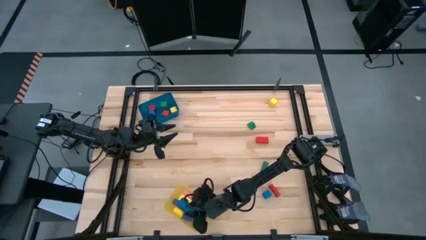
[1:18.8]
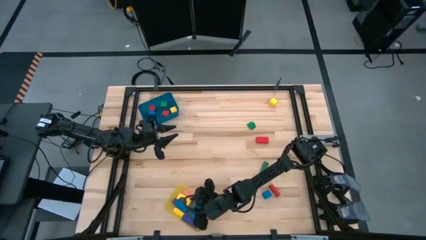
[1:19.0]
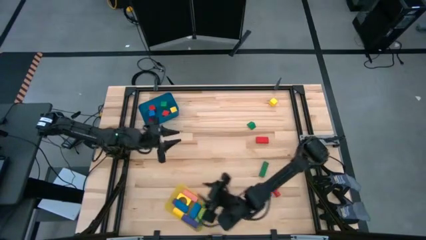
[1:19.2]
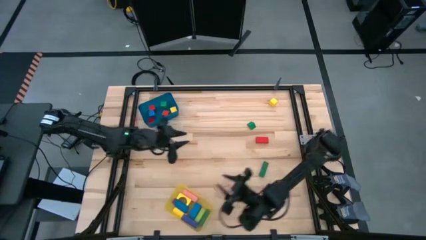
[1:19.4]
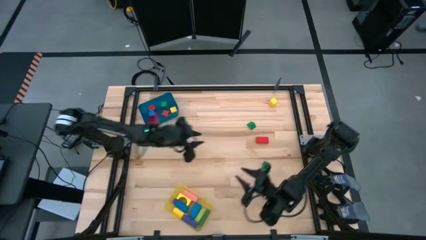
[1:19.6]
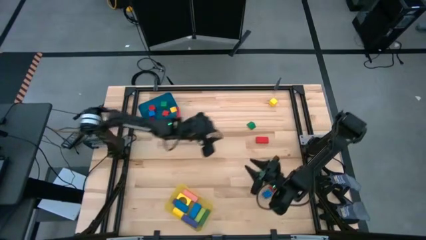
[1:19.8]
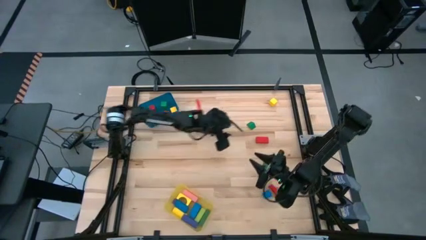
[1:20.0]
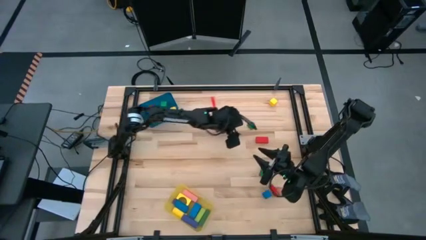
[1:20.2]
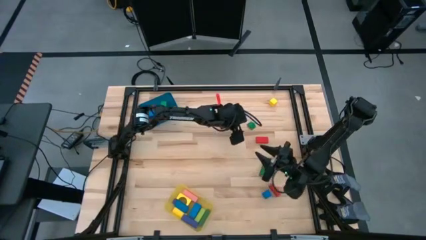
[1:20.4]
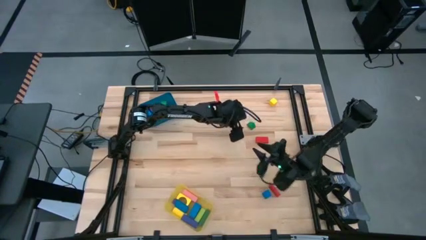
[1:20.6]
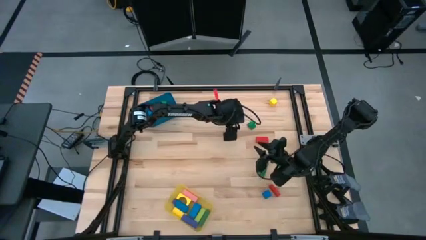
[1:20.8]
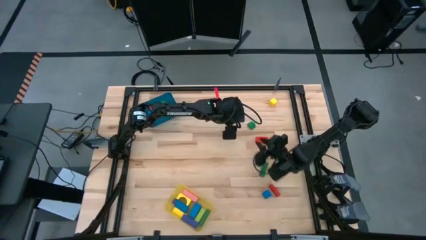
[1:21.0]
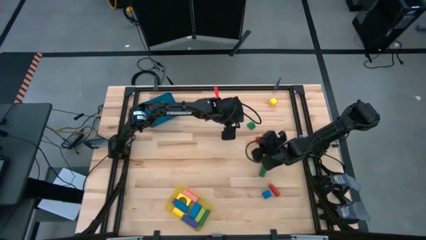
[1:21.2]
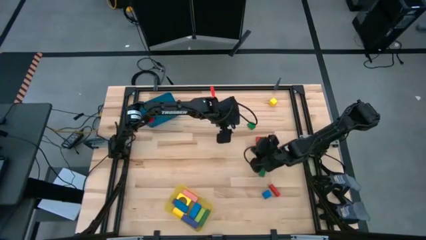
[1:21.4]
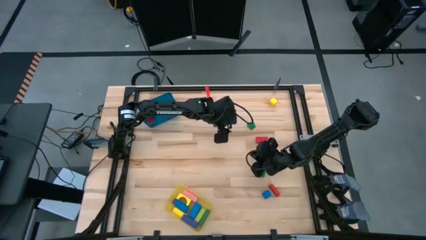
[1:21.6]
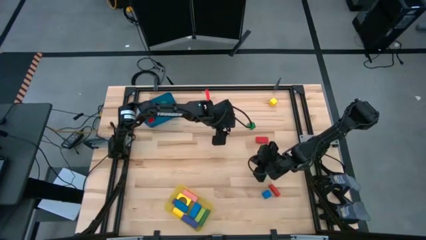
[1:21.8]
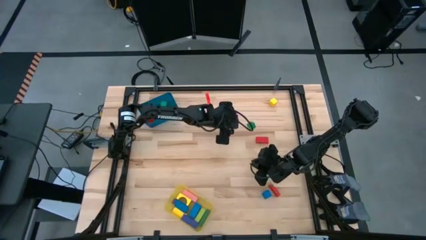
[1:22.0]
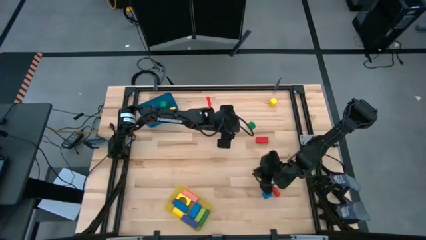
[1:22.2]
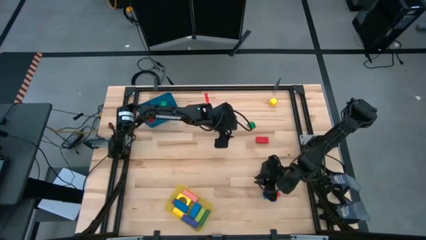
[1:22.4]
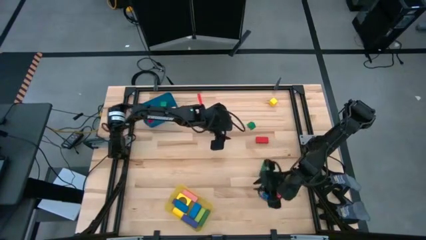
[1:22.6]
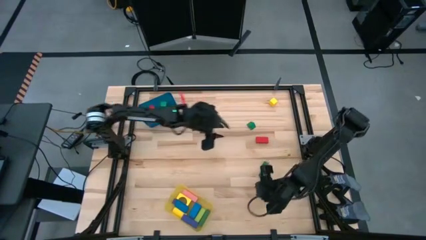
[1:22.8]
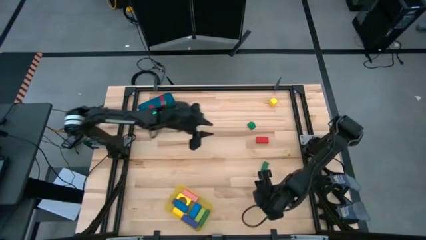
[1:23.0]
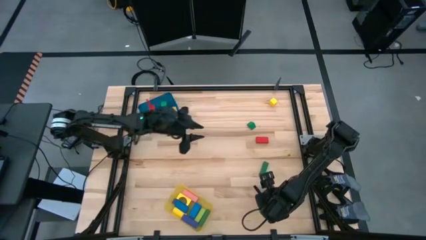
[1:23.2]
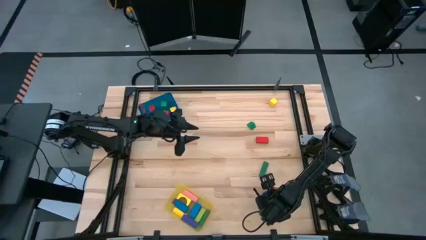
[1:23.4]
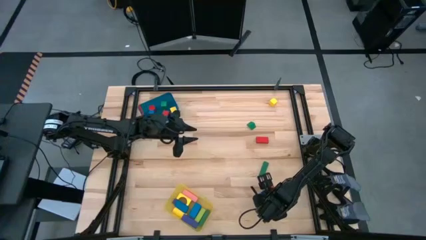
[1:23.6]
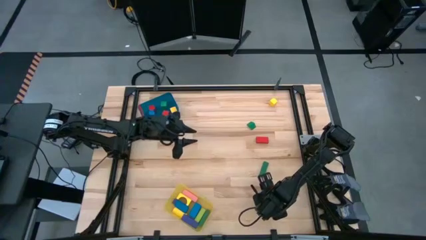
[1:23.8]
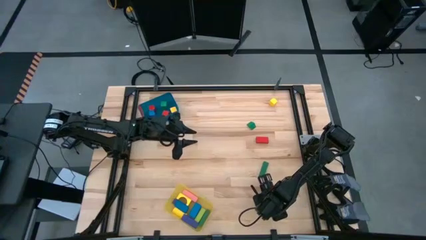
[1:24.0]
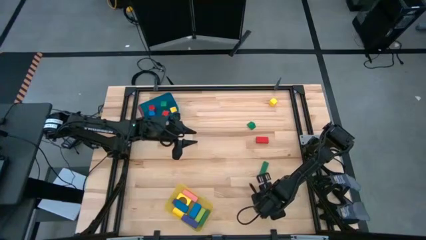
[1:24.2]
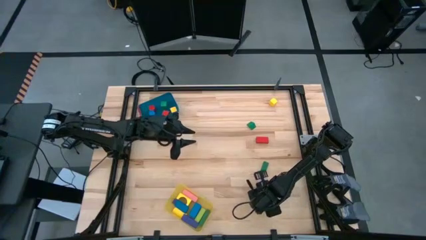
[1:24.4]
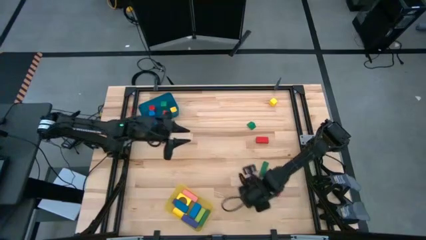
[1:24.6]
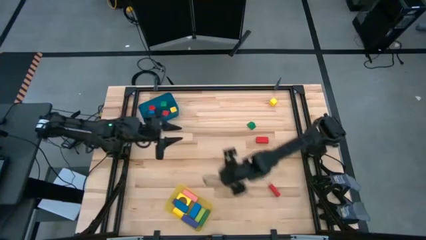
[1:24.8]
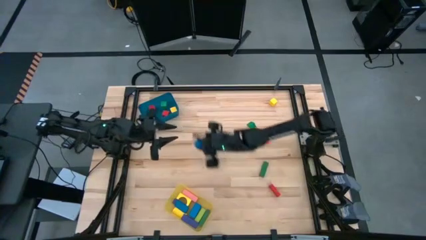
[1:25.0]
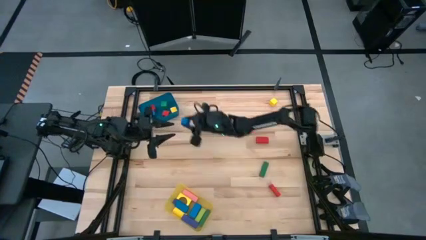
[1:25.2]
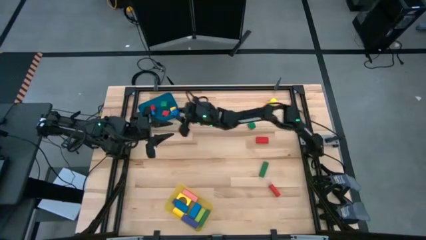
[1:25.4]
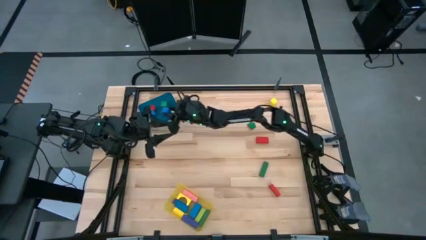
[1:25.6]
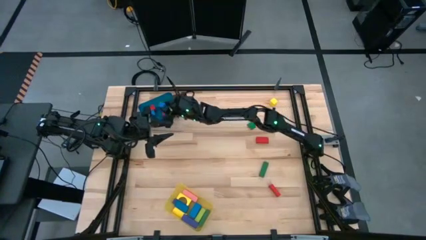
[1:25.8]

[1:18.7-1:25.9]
Task: Sort blocks by size
Put the small blue block into the blue bin

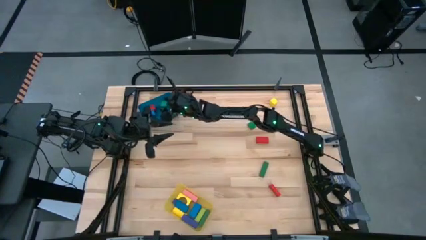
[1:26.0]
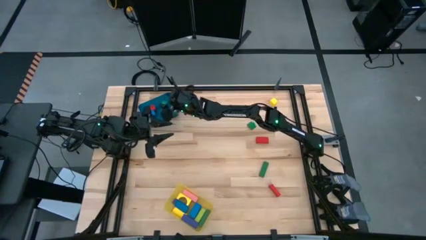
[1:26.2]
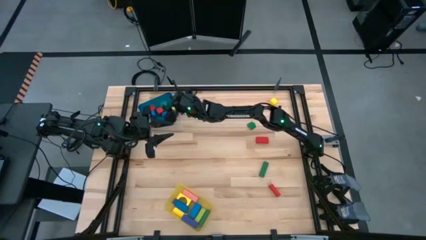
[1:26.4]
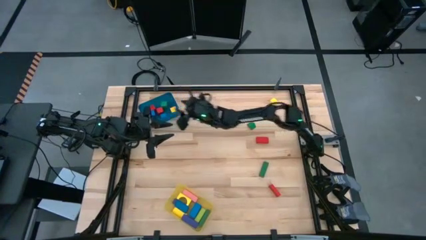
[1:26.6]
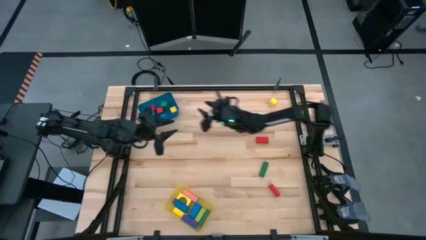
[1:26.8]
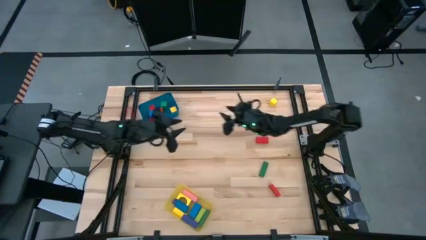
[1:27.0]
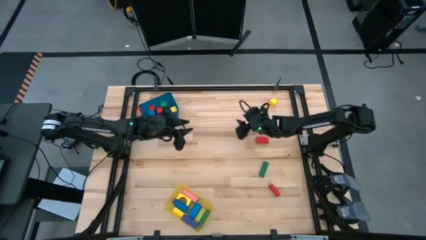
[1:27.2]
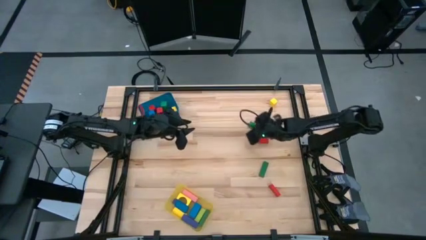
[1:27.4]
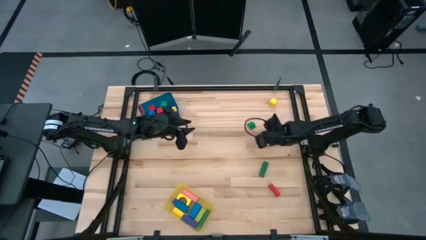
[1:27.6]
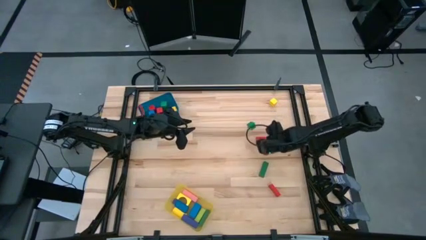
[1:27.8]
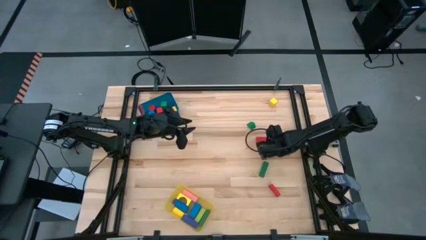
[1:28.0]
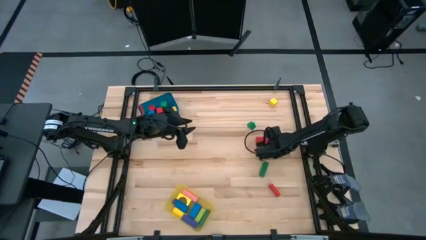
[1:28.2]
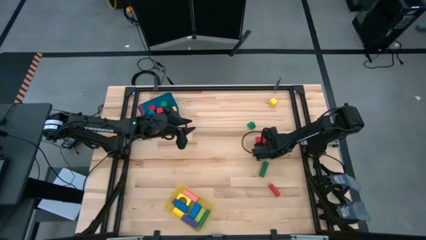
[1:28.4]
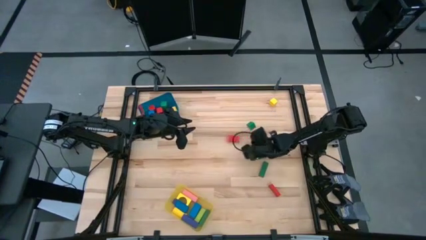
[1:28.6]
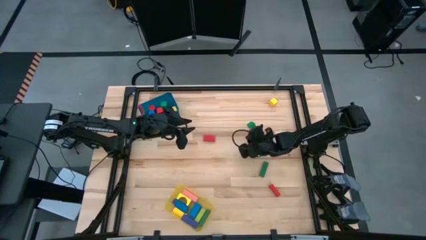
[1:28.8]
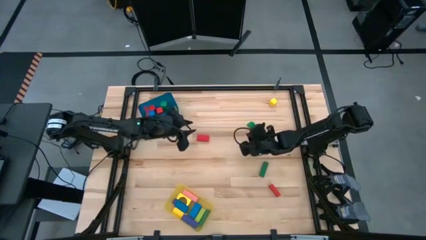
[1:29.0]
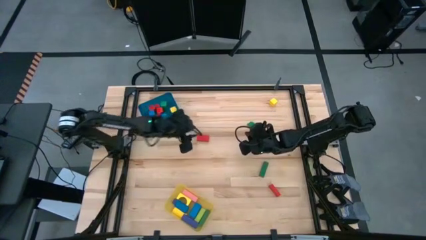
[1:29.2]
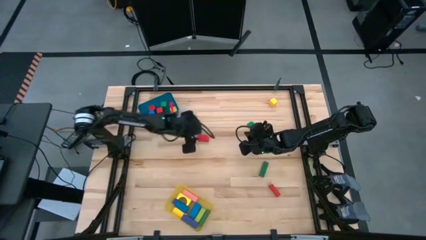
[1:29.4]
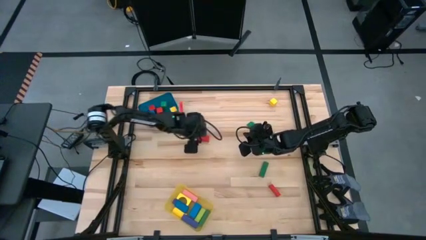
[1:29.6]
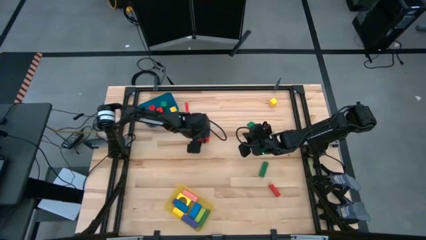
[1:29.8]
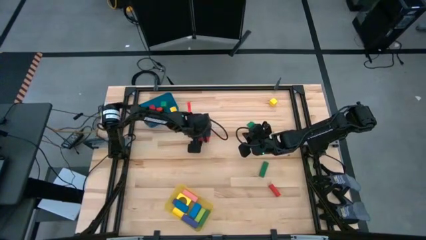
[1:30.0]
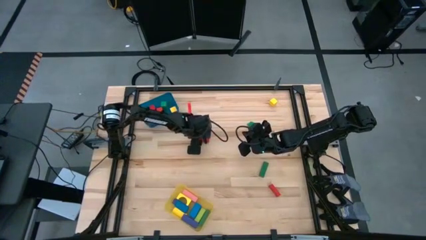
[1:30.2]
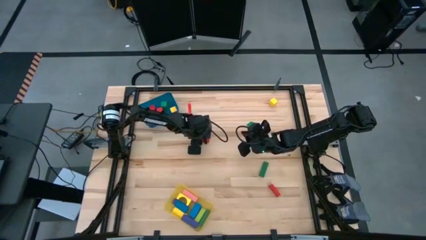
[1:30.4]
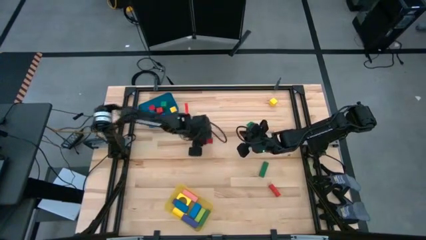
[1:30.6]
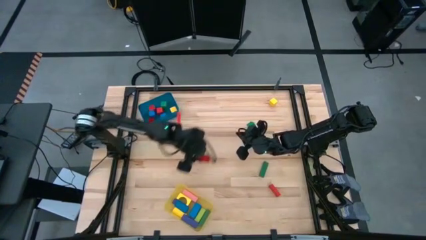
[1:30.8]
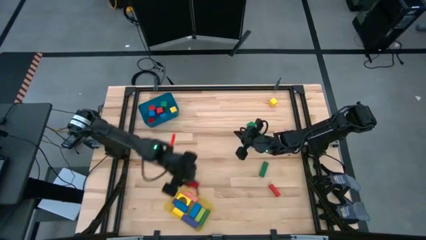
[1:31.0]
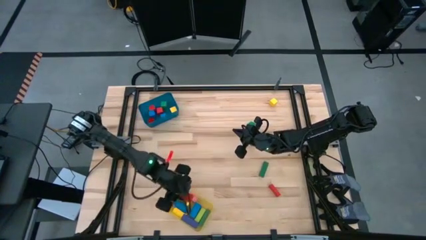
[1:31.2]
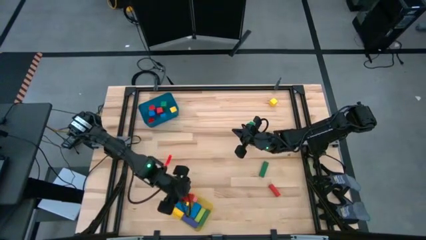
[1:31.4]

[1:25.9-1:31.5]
Put the top large red block into the yellow bin

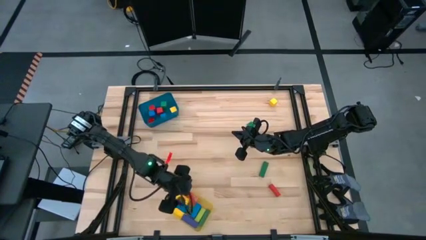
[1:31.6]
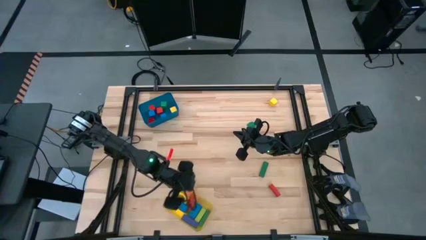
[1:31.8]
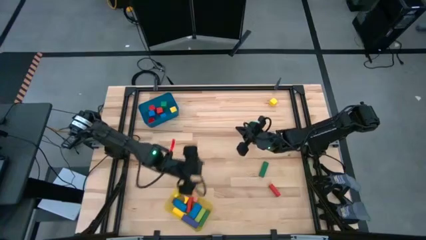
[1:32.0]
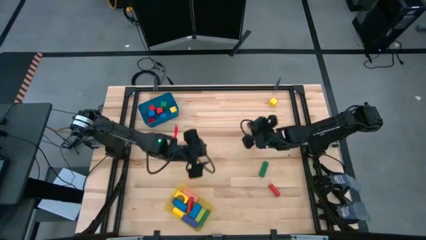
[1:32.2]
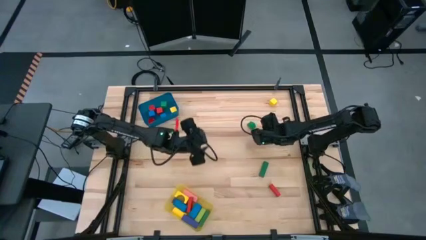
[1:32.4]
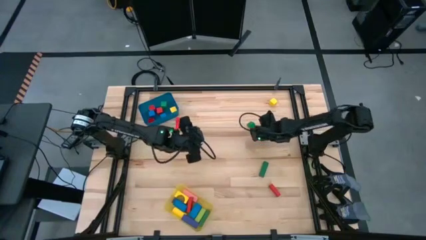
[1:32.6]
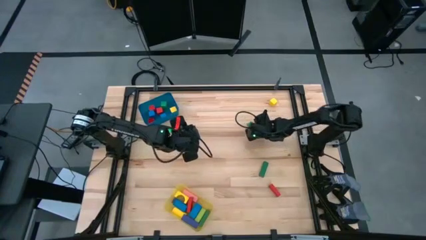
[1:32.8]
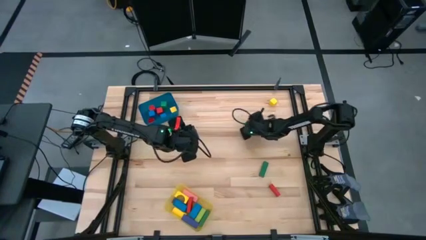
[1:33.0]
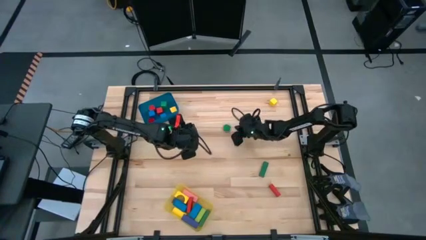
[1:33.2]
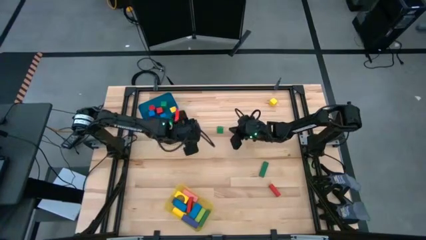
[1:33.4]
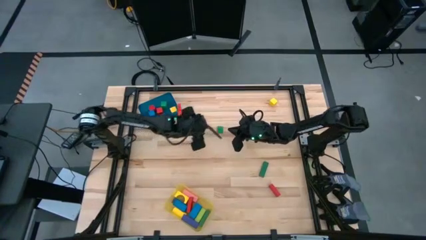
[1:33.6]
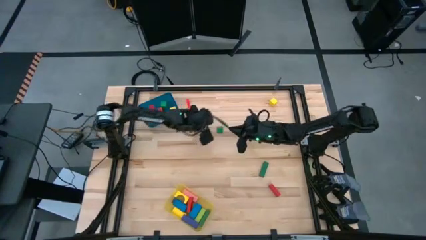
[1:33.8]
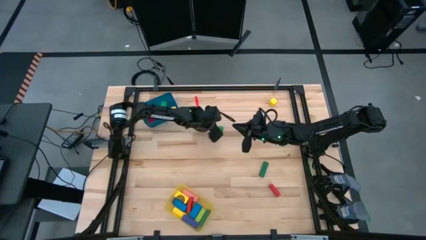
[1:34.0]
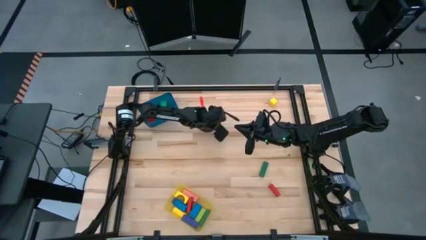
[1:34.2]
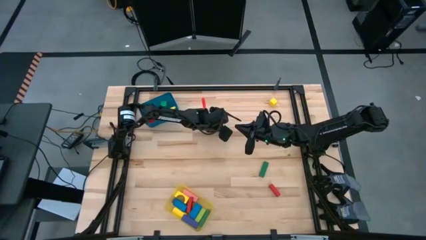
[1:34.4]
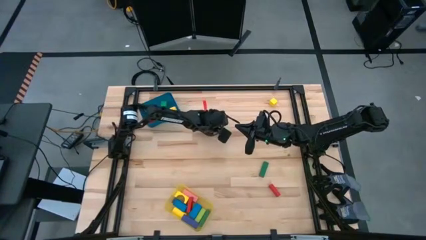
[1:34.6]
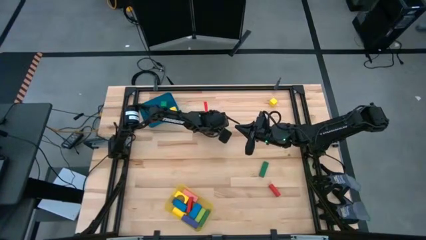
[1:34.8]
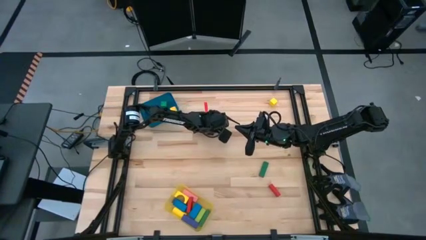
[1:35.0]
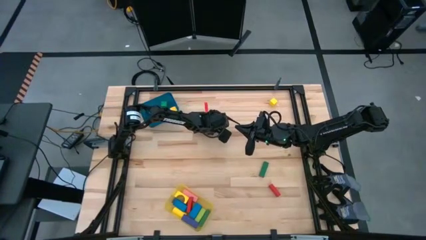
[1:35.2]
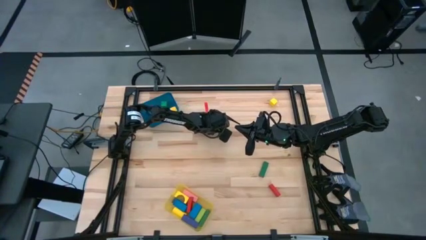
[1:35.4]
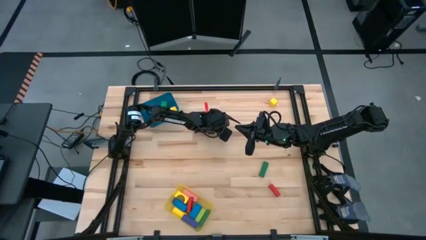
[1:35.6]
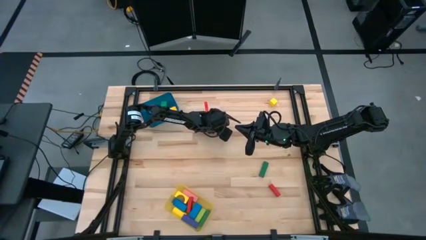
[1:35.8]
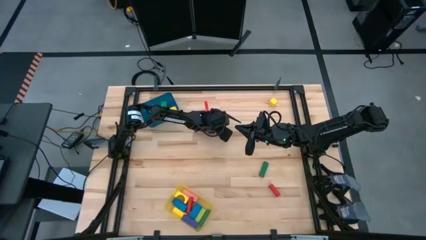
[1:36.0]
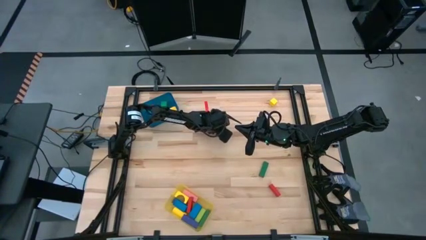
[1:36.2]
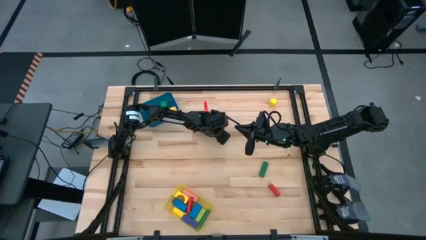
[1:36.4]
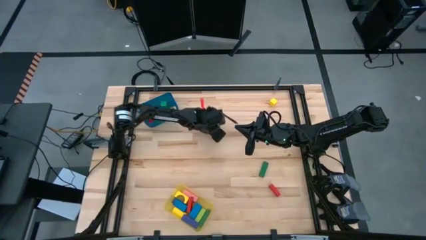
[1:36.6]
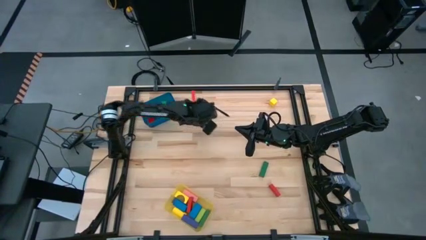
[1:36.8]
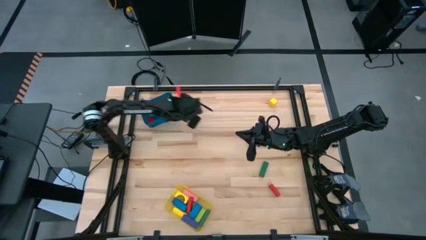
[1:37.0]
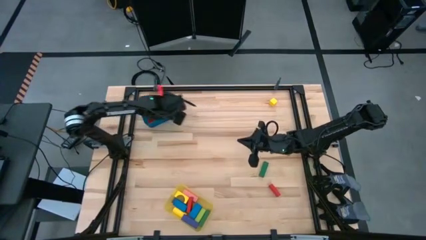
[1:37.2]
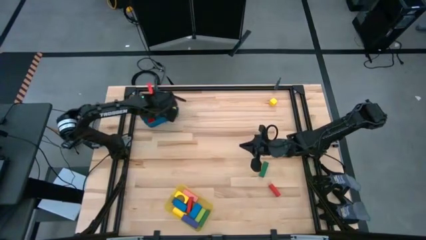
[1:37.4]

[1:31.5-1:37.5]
Put the small green block into the blue bin
